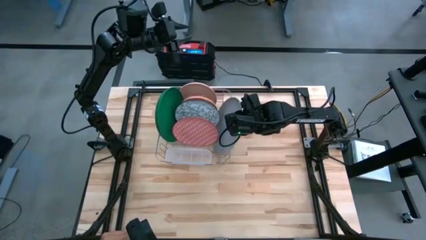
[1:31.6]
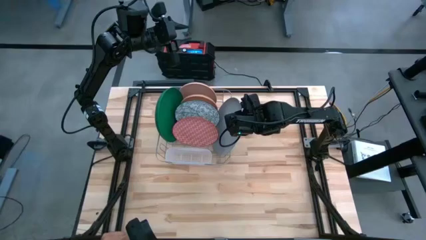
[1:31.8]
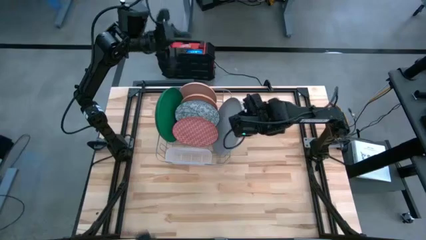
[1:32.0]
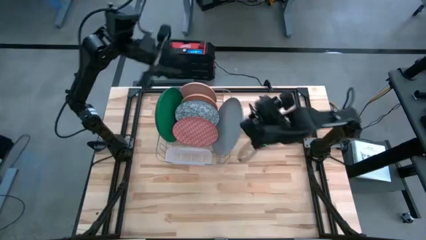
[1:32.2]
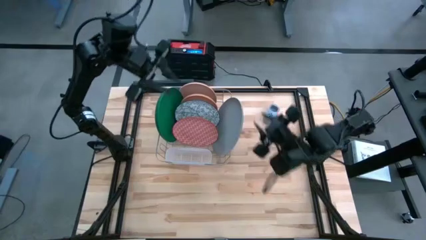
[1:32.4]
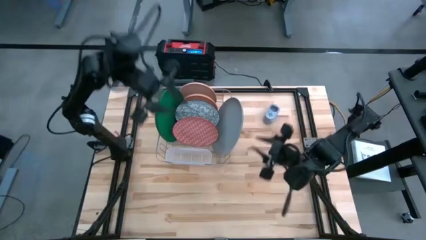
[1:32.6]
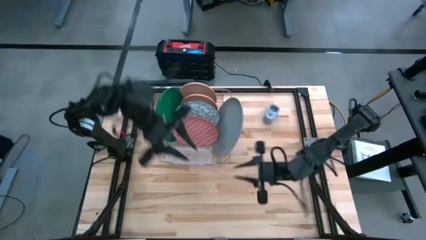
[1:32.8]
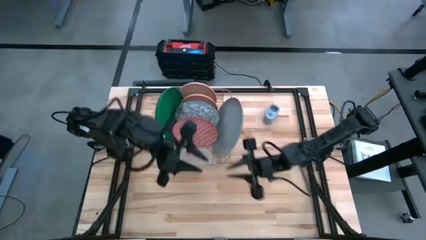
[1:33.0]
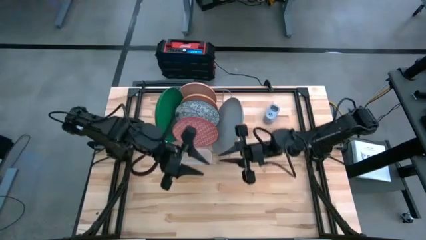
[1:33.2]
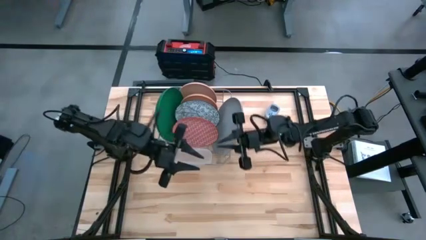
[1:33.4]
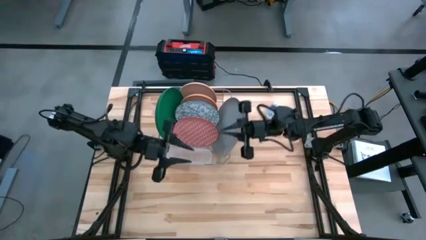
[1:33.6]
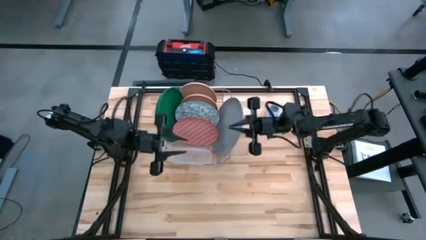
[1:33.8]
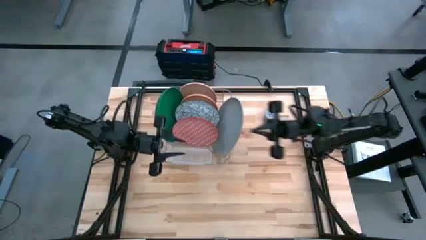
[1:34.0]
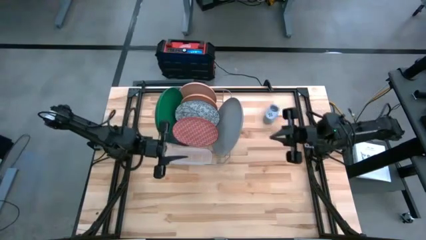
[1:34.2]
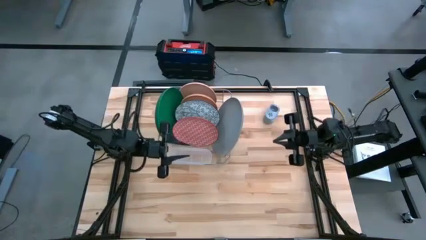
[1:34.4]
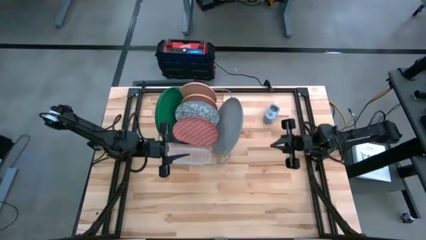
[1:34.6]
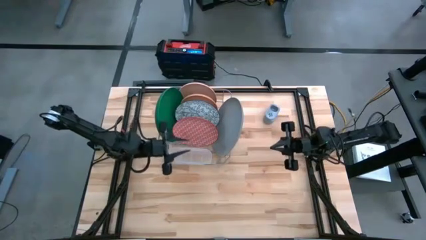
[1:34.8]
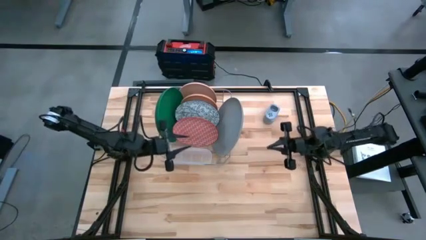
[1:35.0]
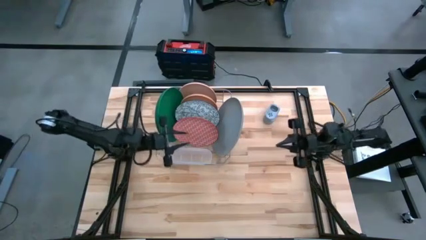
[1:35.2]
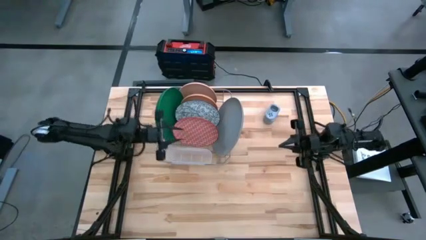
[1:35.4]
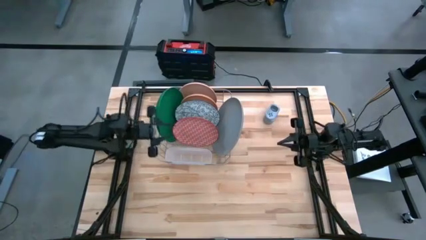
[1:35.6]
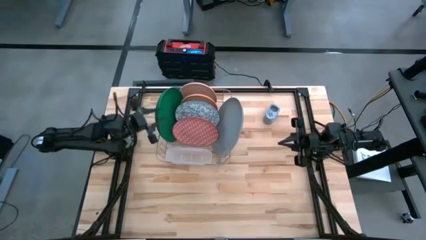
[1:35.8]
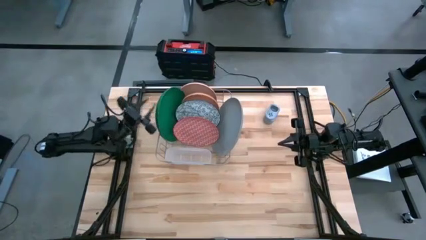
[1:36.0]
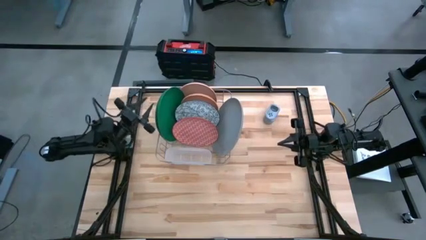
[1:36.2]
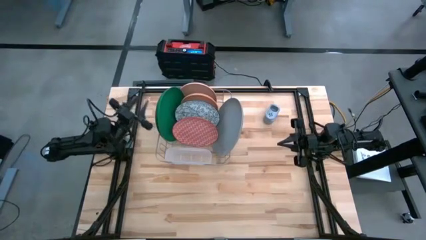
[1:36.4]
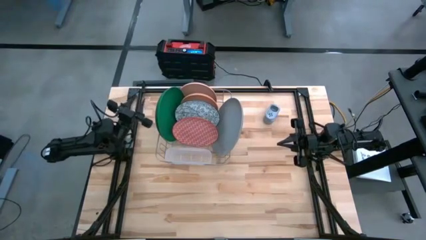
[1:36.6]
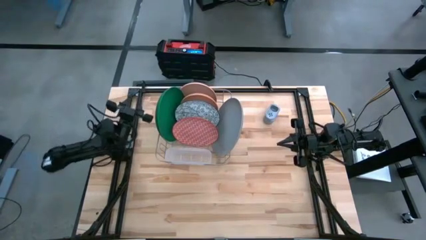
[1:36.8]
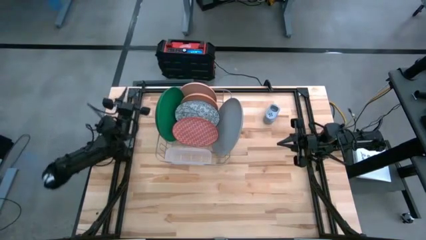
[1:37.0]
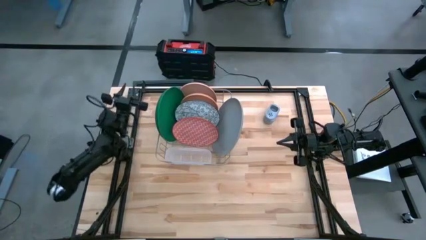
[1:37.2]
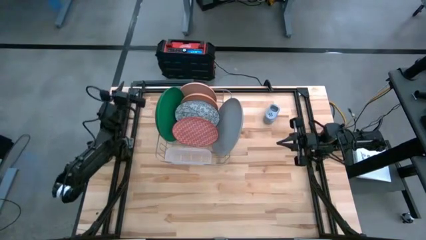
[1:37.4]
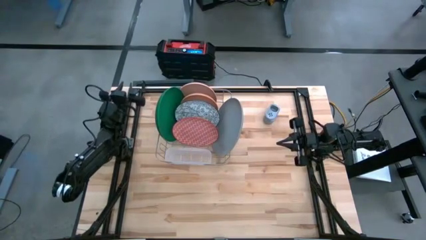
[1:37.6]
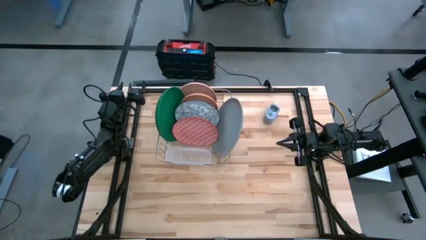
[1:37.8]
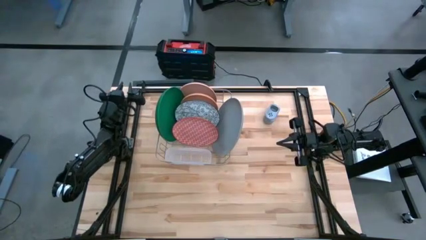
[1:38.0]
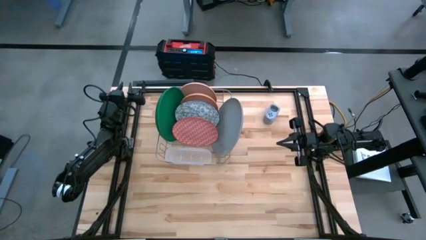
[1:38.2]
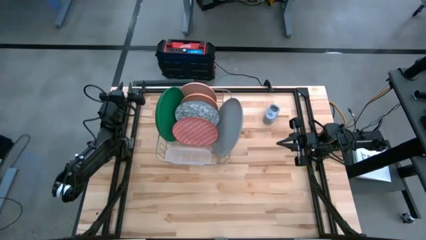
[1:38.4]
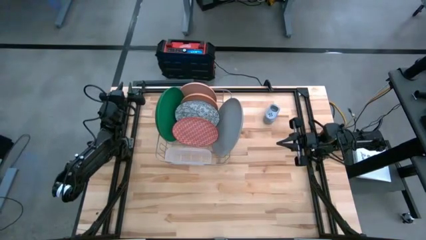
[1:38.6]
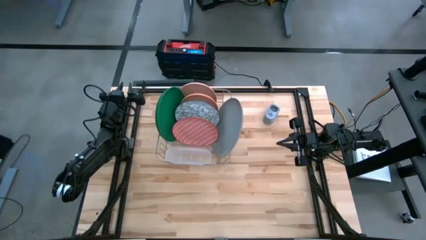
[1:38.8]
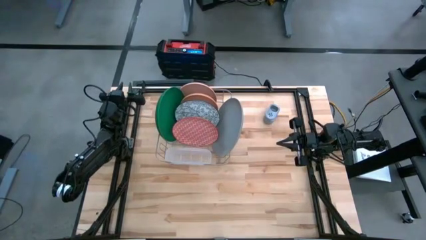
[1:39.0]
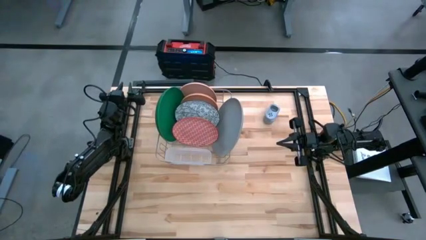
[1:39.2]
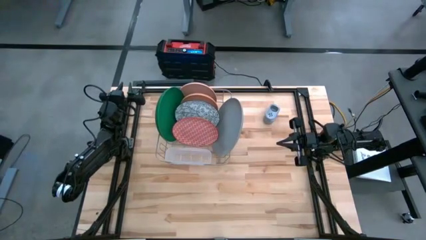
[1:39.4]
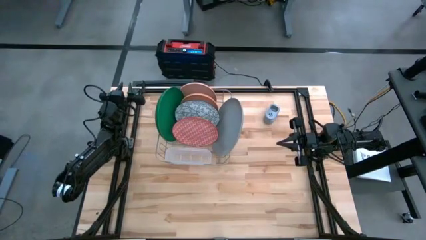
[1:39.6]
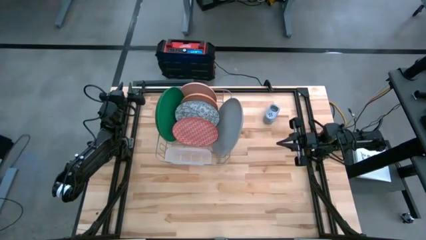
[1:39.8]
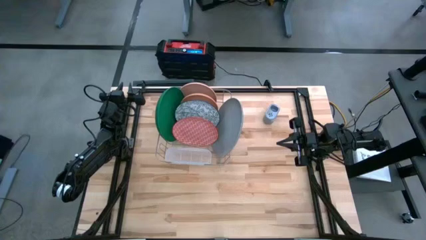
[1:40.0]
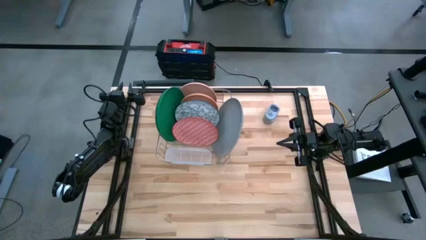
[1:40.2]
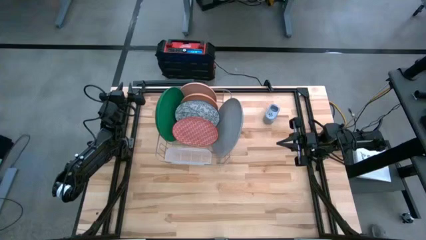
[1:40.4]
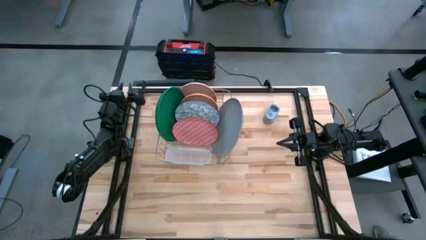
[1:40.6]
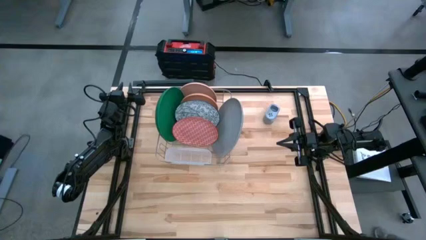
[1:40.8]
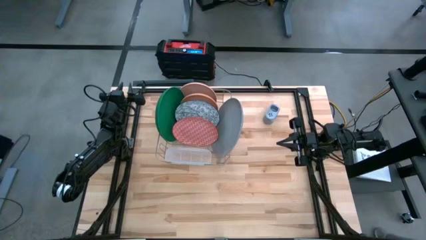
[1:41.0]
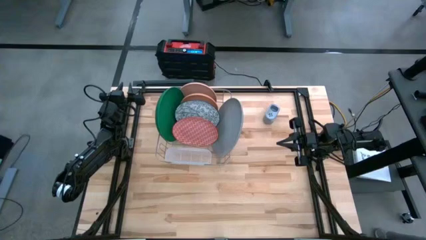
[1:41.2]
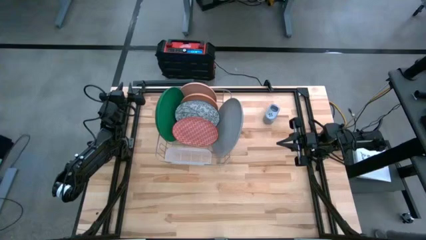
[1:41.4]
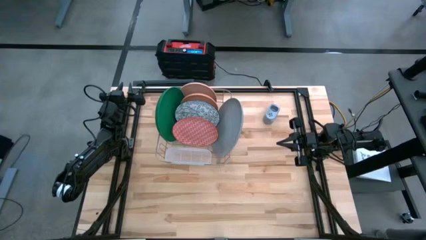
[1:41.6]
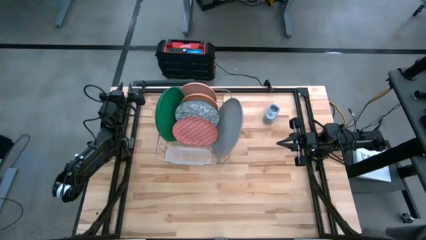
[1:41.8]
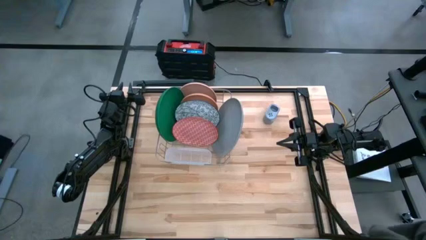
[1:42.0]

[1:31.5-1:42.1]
Task: Sort dishes
Return to Home Position

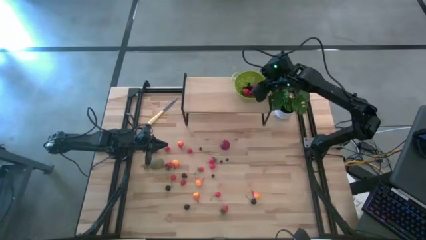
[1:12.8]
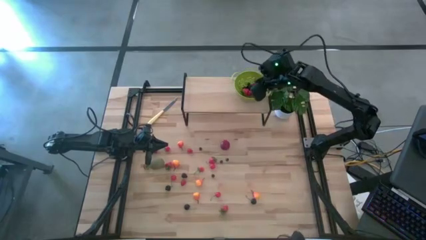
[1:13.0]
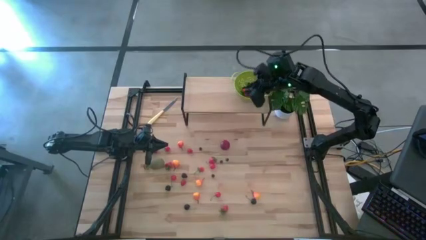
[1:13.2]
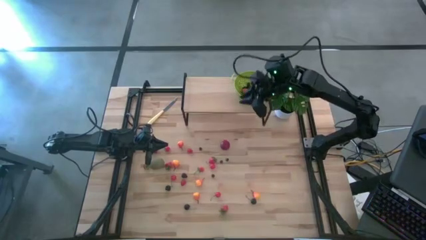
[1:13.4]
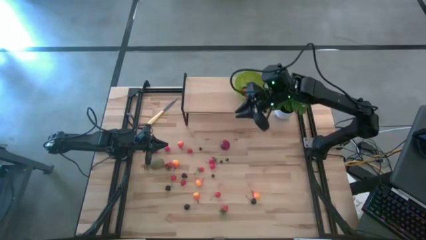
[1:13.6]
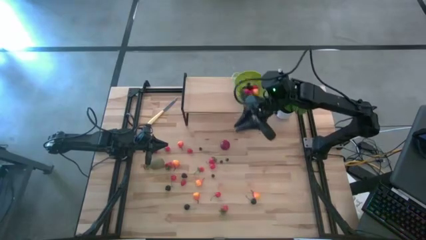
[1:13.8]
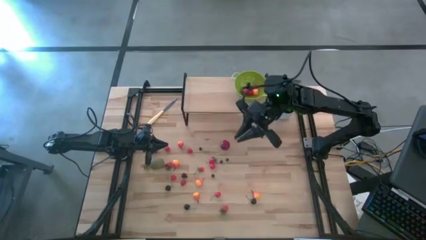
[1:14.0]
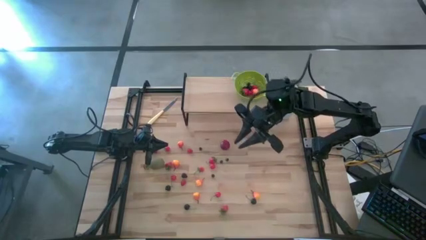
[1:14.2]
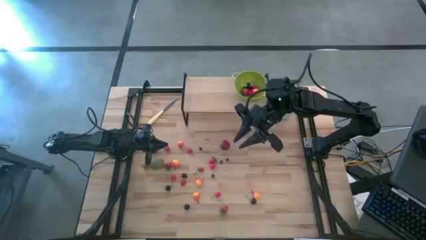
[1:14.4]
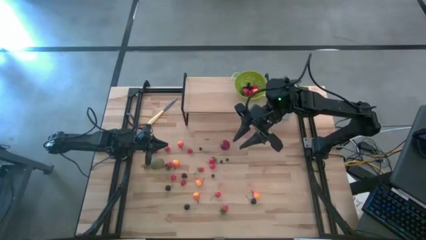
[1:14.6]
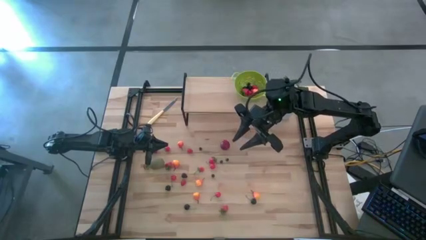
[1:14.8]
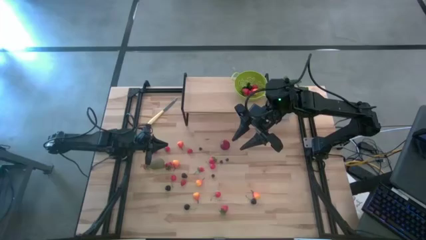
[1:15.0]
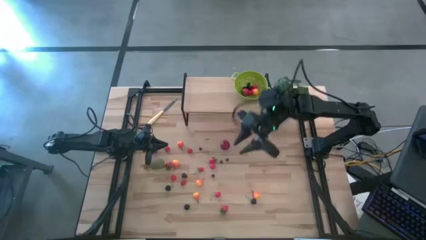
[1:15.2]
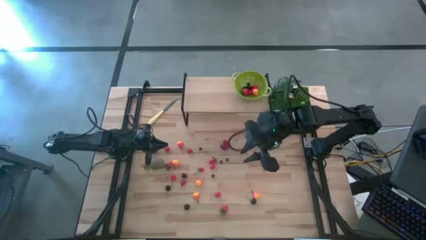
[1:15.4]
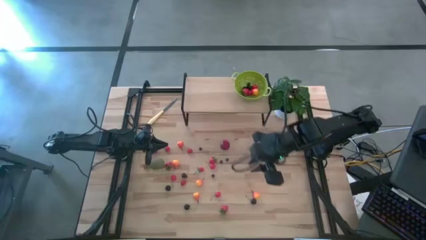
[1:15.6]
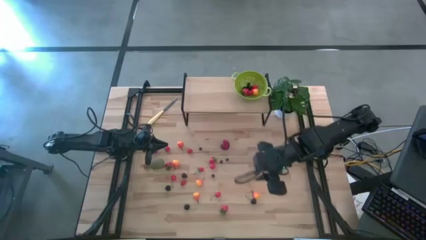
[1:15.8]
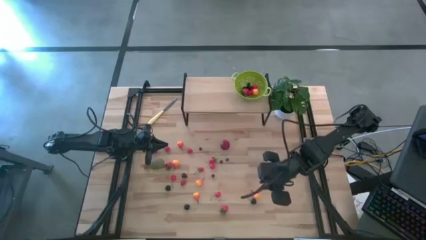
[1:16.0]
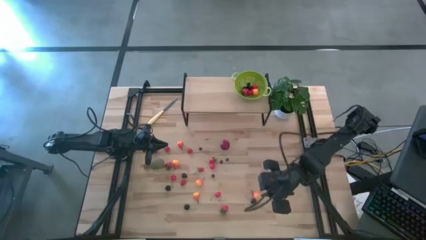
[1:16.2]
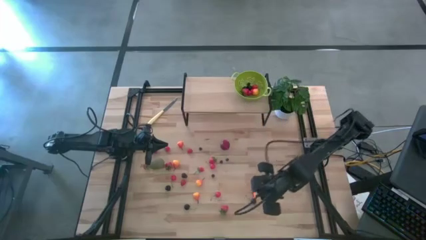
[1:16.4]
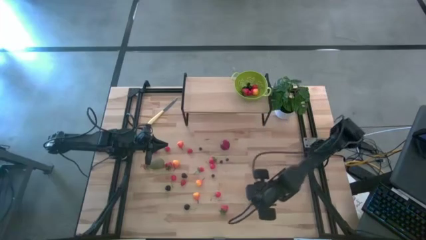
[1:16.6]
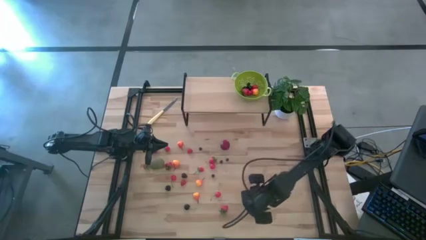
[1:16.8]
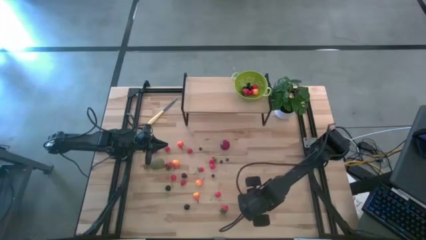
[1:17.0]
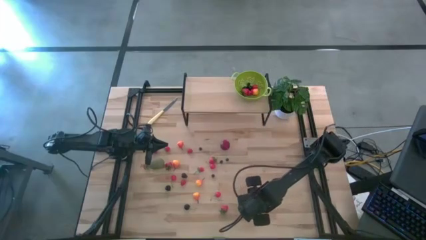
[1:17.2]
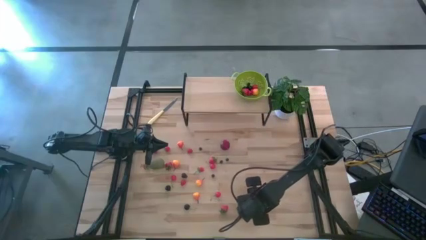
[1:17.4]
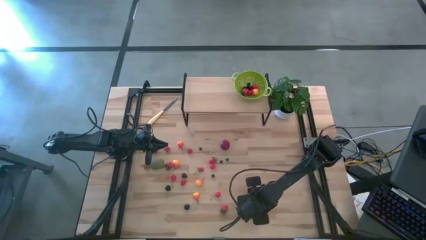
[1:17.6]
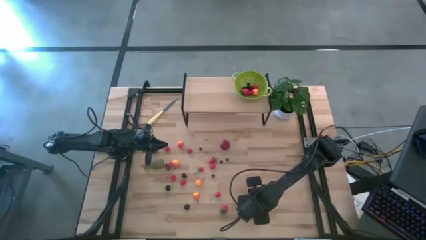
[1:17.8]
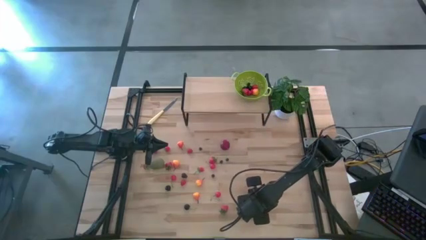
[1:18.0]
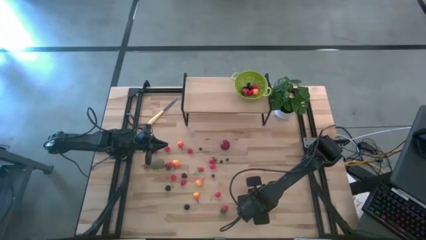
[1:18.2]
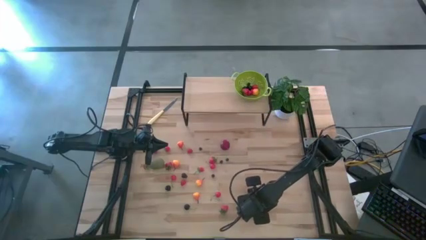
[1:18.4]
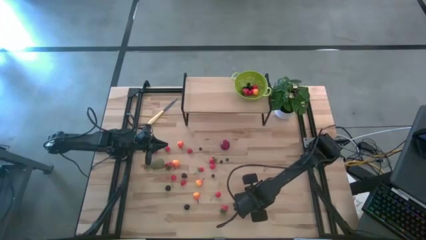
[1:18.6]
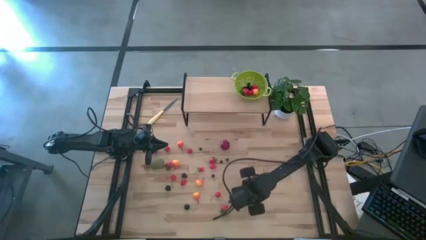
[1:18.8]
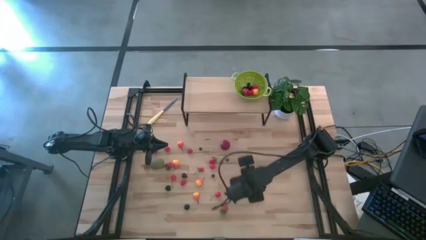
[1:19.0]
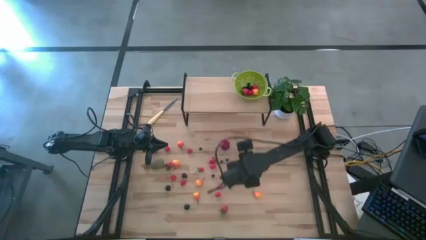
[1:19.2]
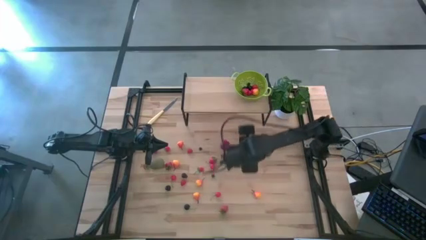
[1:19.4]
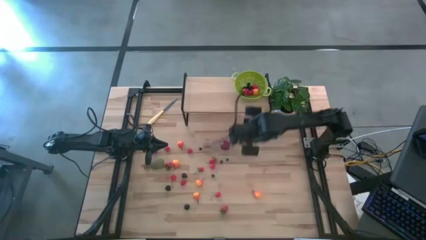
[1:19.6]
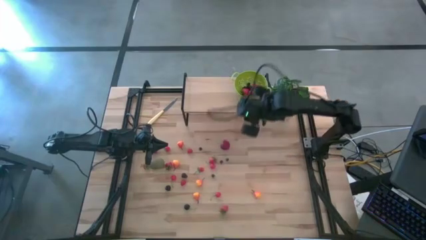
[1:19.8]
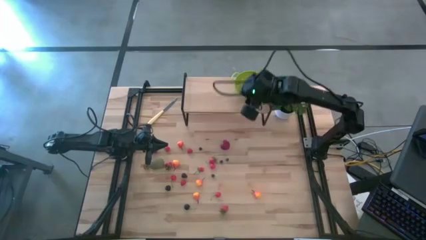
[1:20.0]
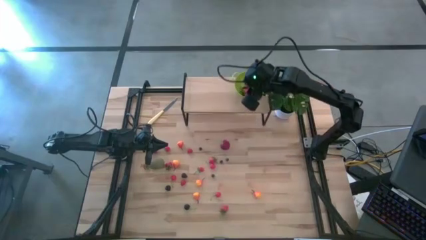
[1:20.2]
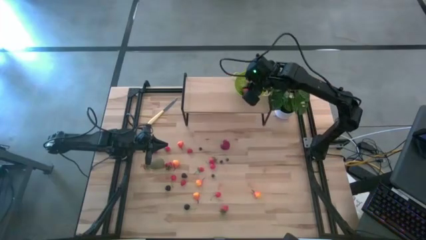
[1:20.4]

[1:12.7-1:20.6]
Task: Build produce basket
Put the black cherry into the green basket
